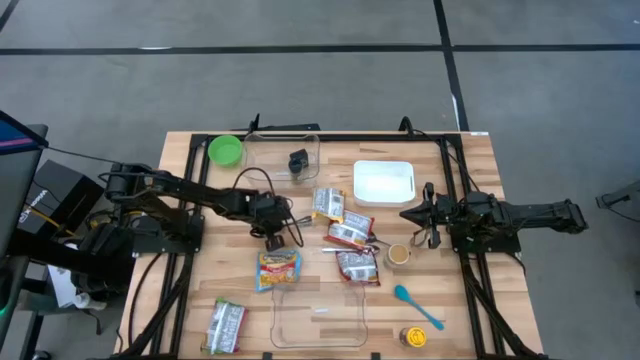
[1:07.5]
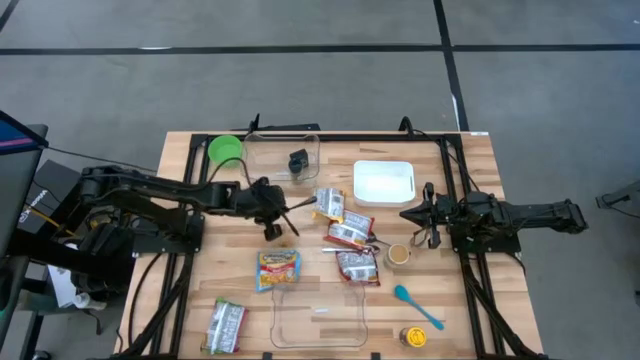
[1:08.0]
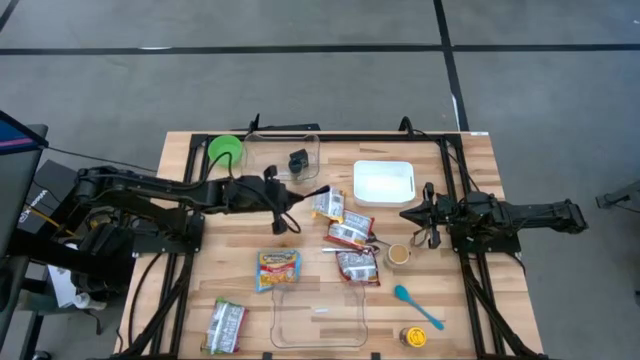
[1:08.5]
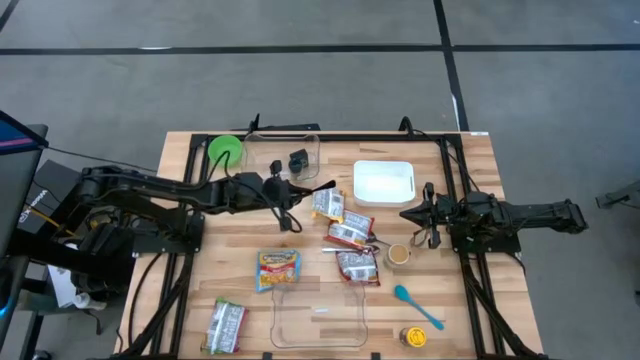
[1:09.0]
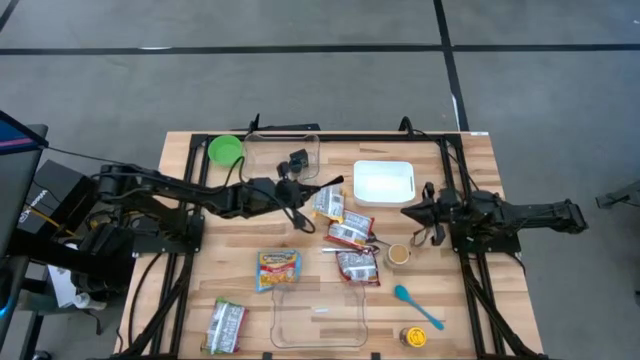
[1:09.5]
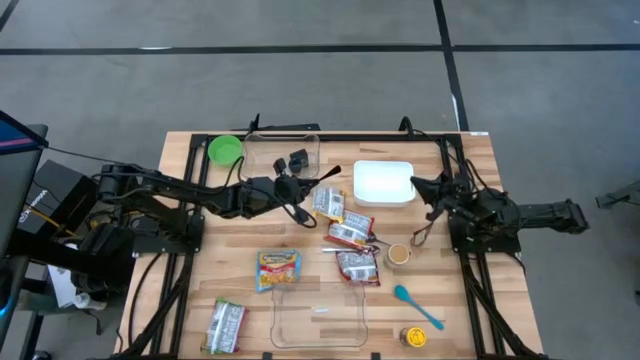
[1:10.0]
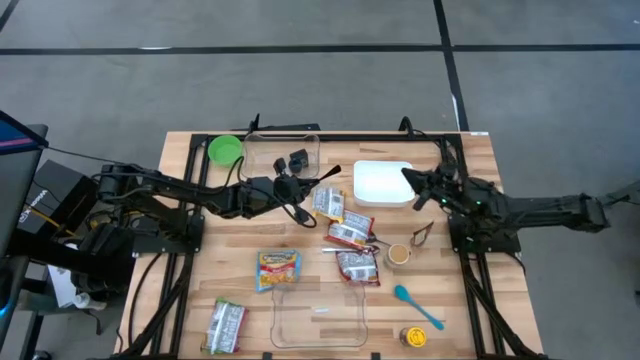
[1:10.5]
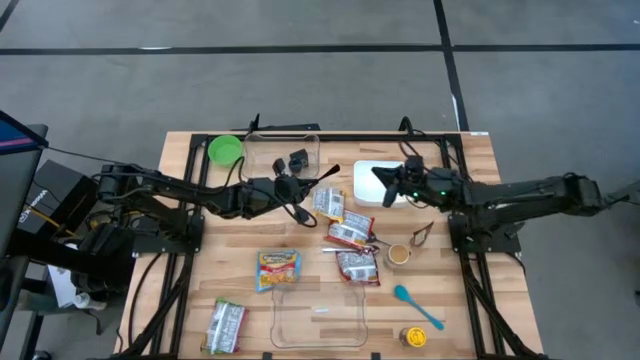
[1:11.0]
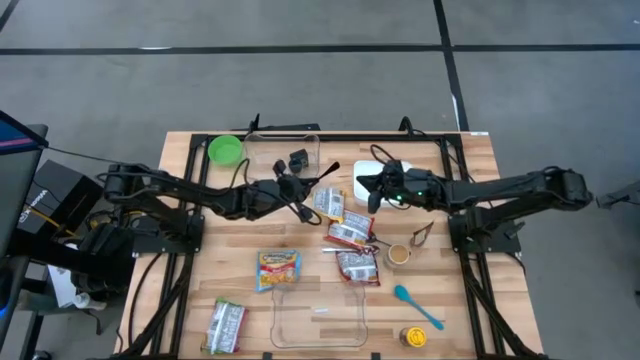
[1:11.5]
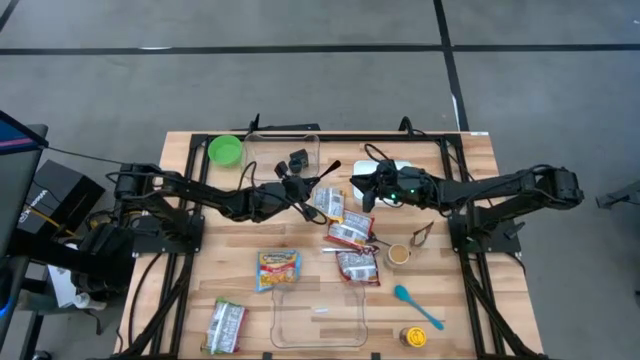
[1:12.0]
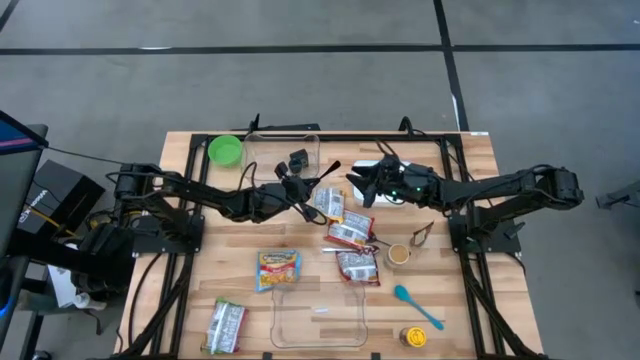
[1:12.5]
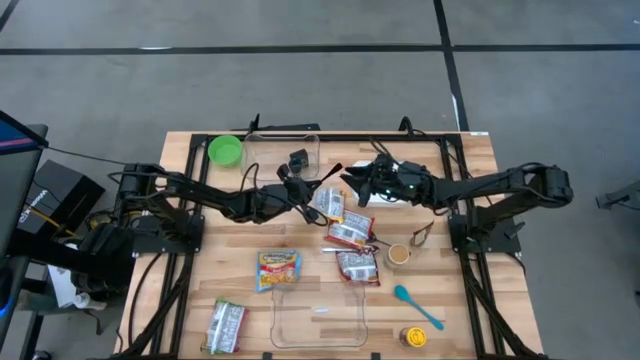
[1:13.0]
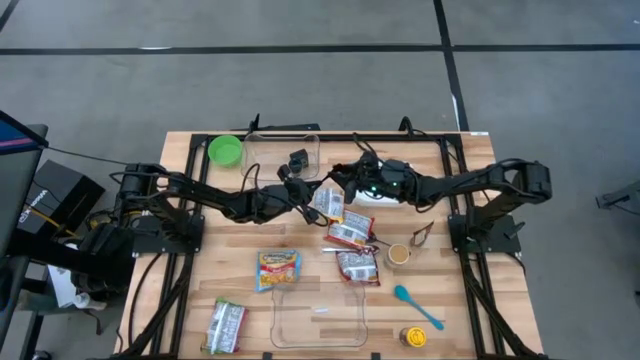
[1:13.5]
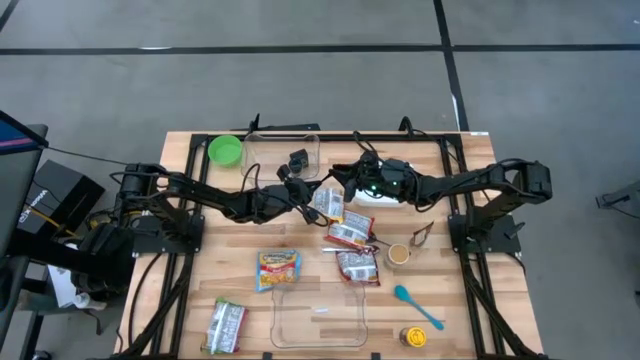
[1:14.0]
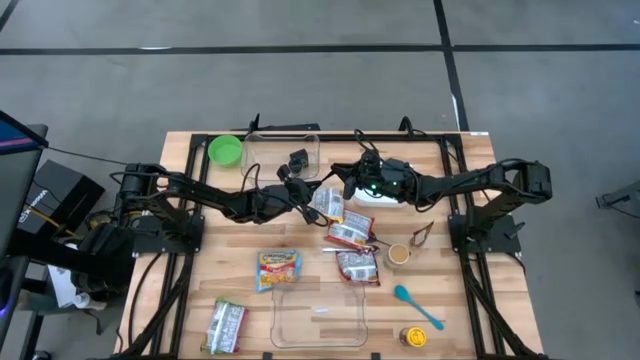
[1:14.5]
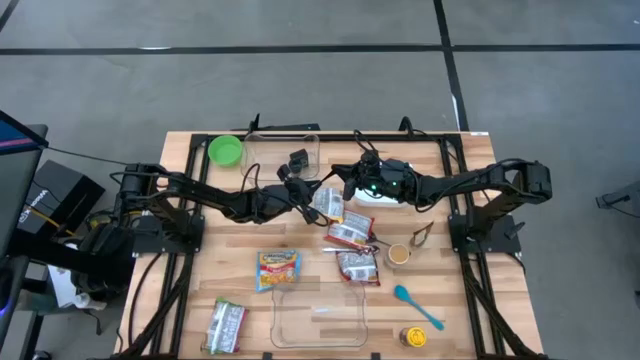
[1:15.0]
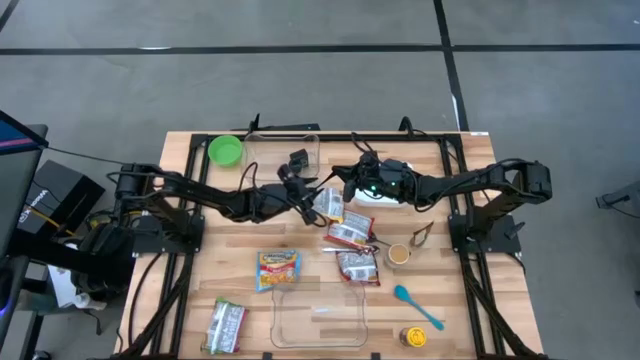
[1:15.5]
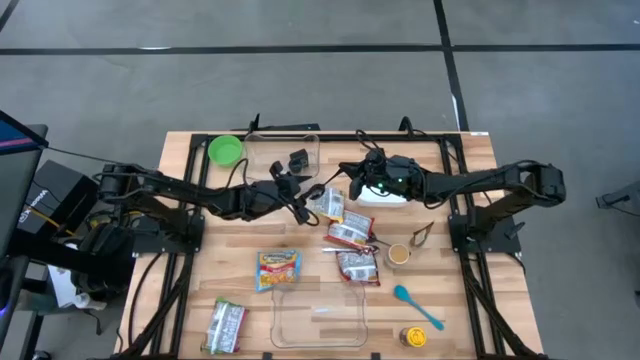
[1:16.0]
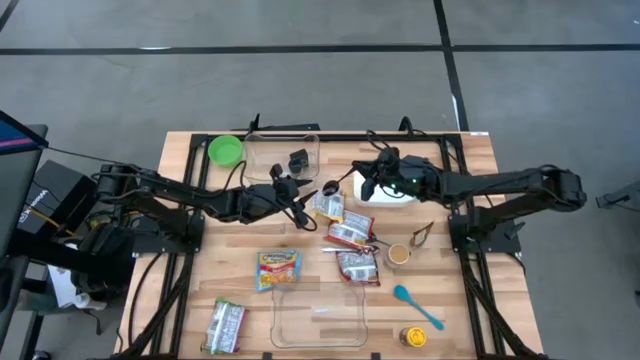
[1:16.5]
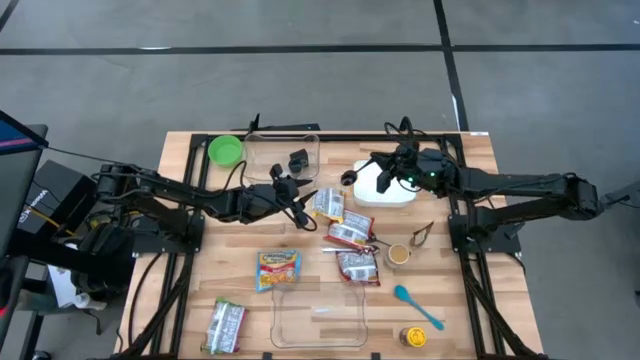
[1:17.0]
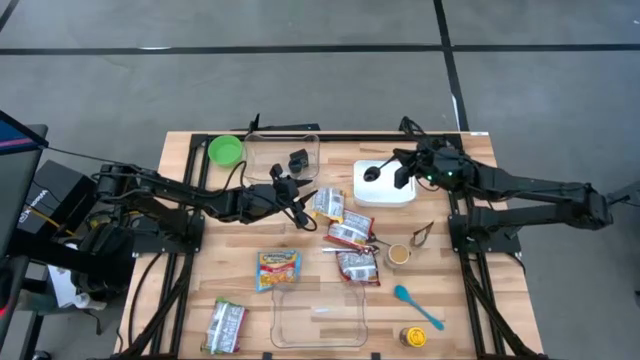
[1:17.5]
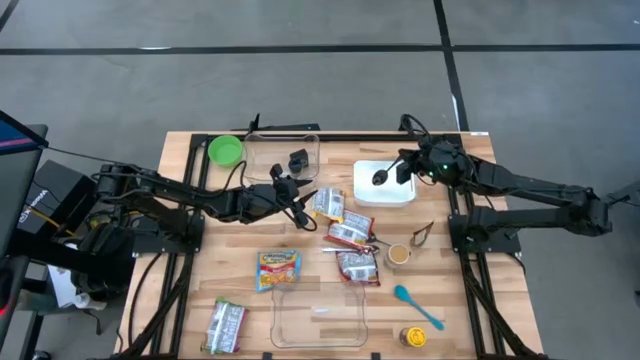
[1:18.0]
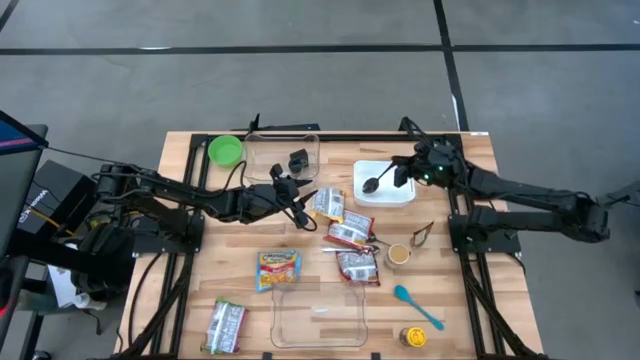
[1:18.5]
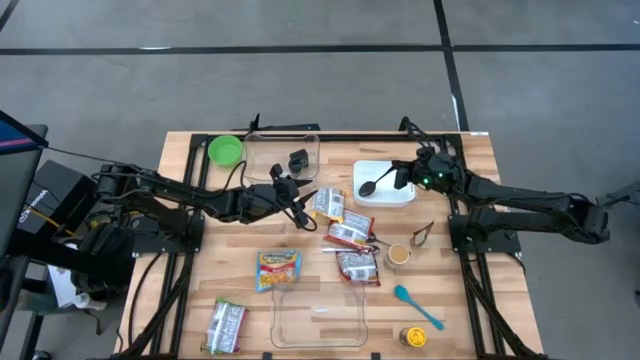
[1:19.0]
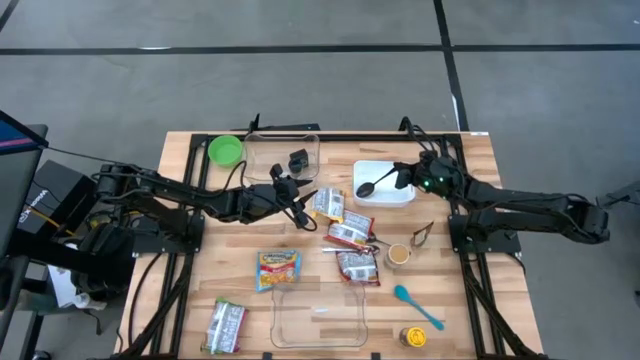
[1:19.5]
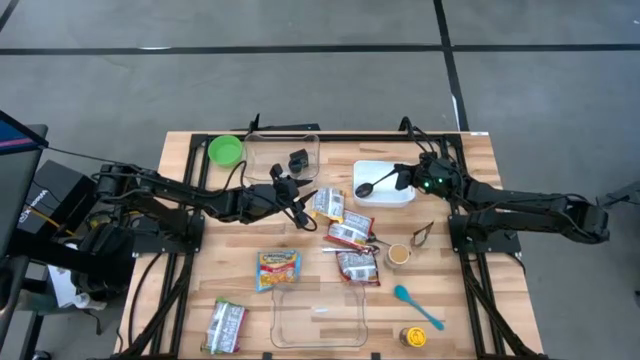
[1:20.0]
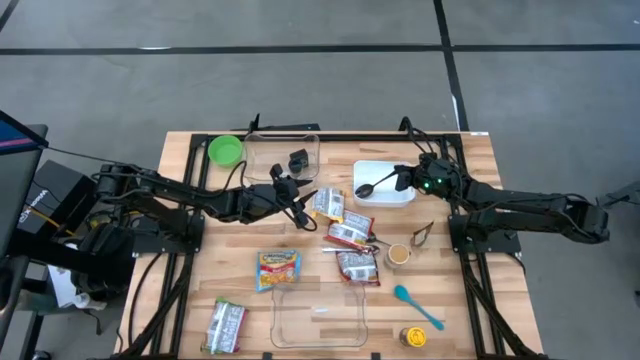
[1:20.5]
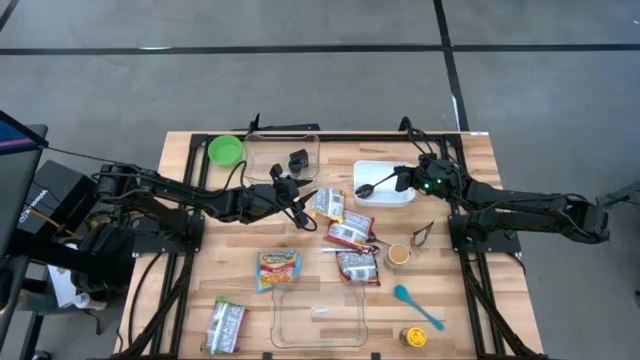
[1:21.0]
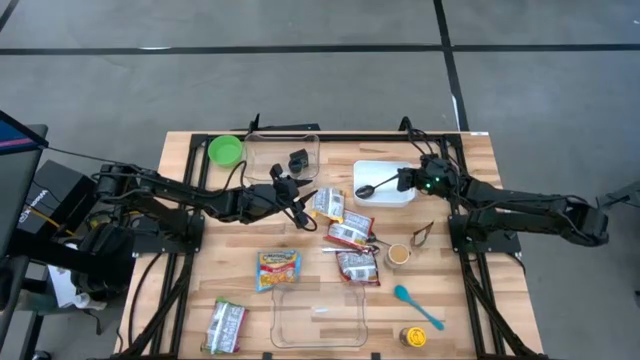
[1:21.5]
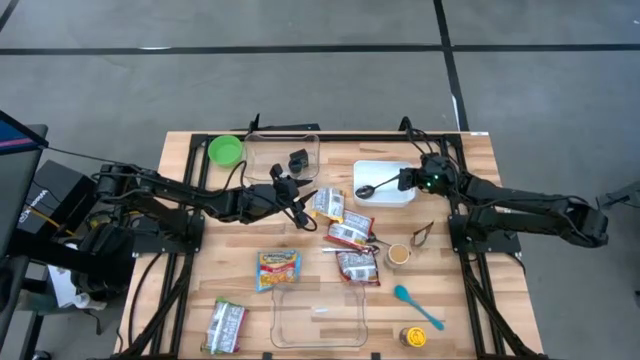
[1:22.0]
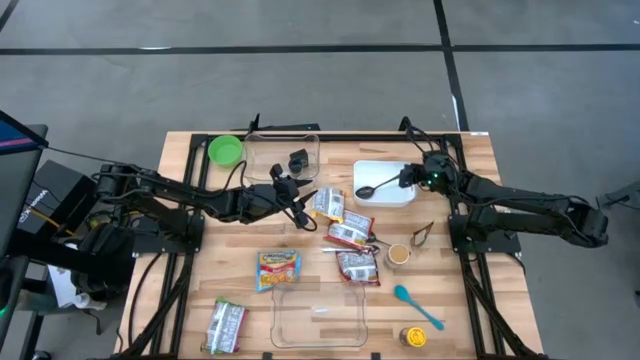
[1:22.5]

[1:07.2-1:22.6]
Task: Pick & Place Food Item
Put the left black spoon into the white bin

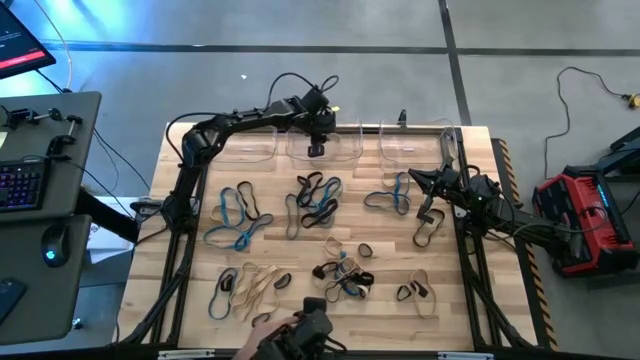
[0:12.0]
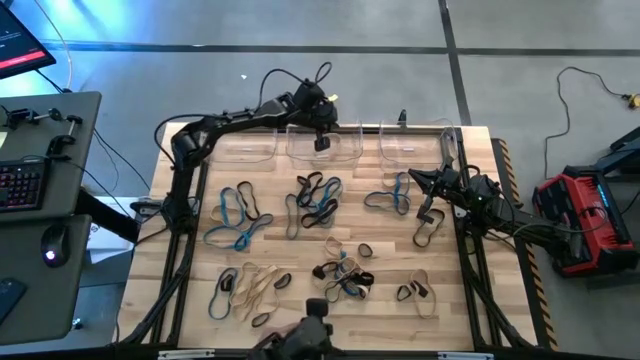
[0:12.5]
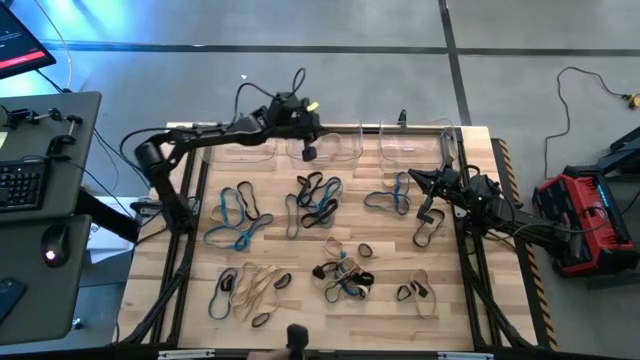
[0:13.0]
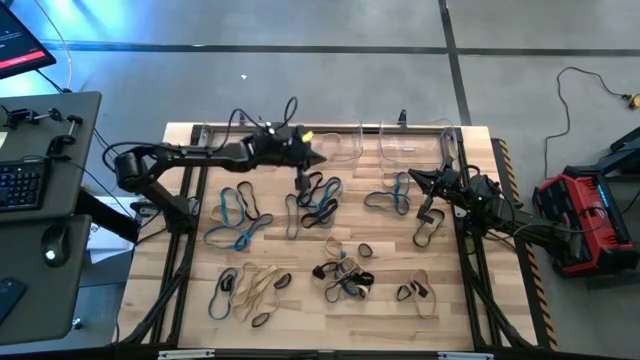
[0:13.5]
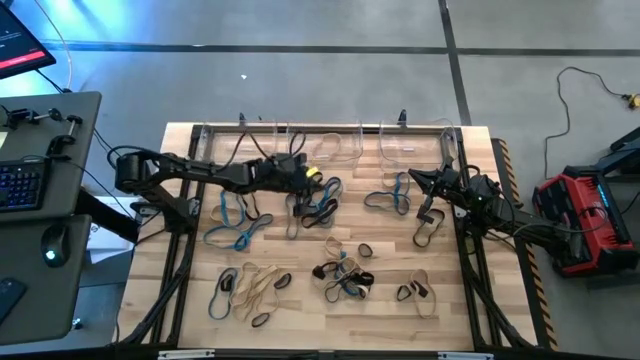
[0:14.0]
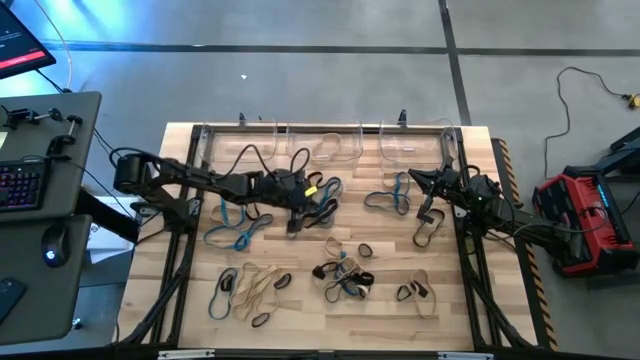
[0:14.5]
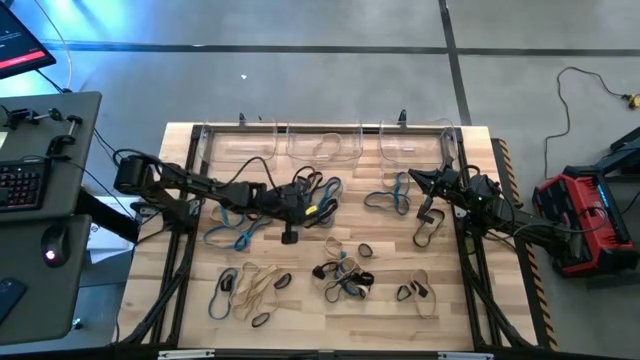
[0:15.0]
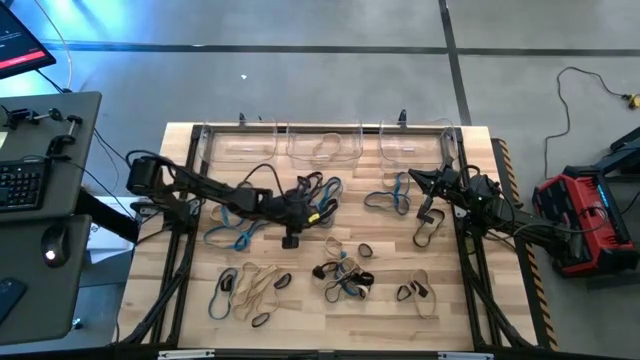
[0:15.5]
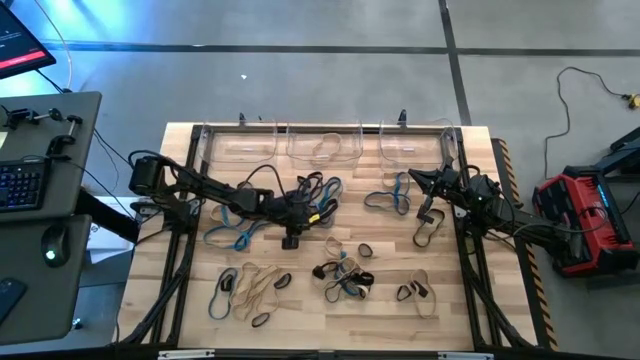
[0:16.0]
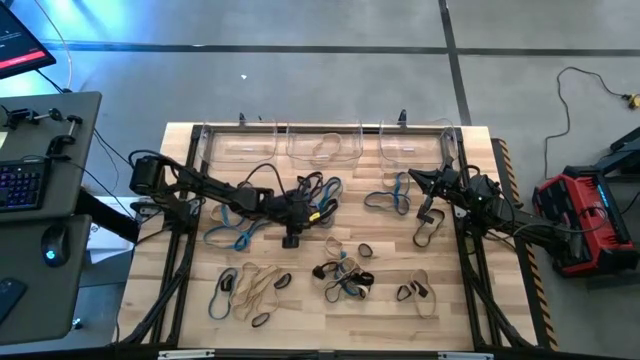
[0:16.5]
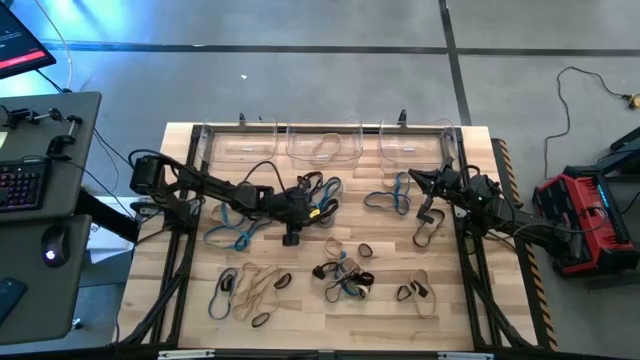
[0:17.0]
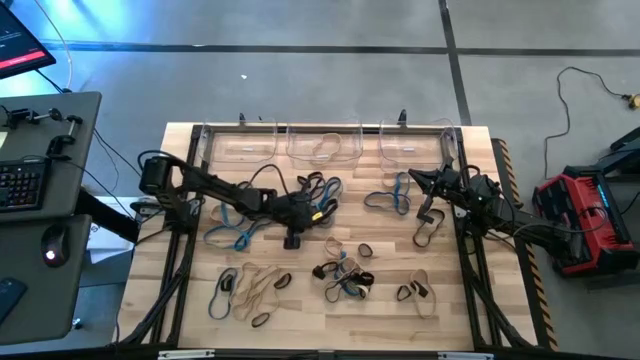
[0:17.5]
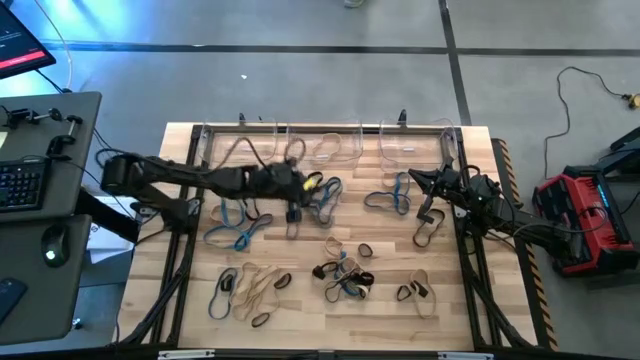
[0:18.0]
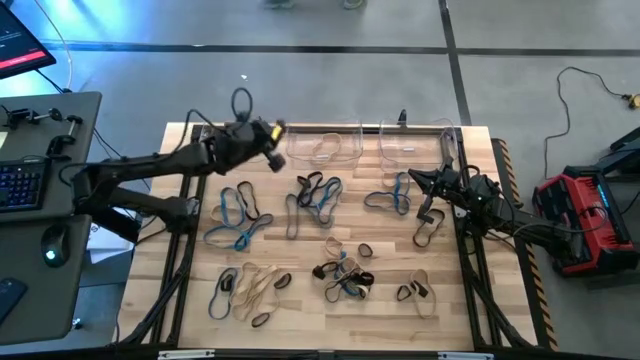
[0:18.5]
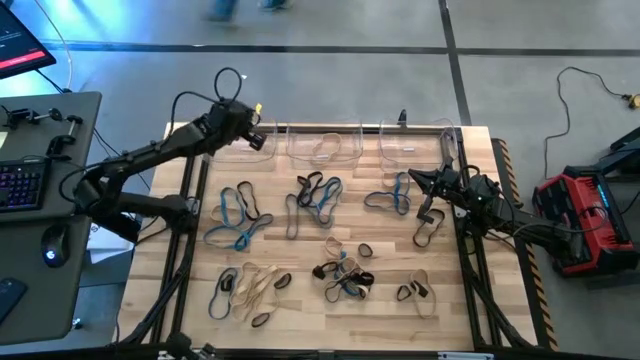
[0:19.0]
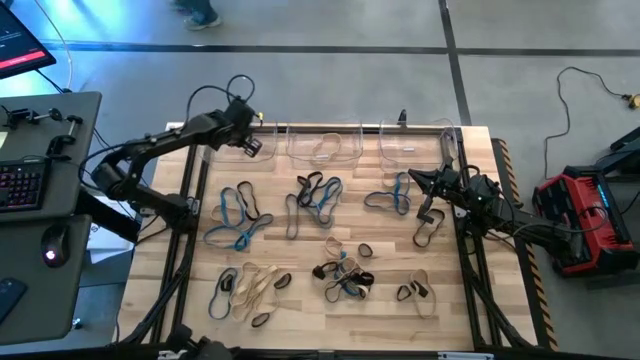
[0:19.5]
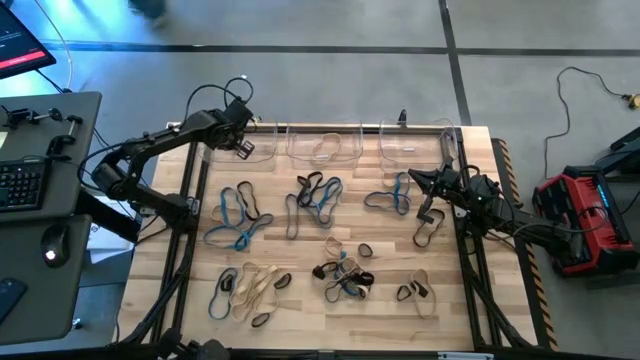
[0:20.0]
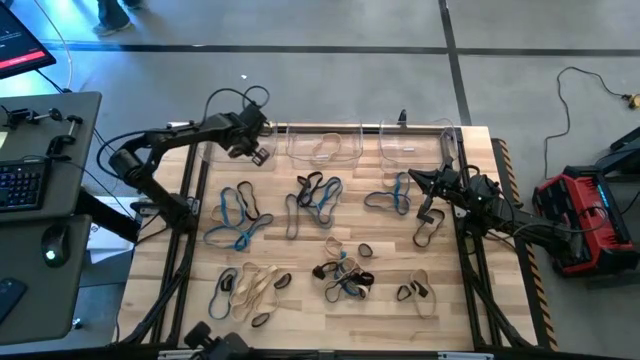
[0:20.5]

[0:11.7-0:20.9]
Task: Sort rubber bands into baskets
Put the black rubber band into the left transparent bin
